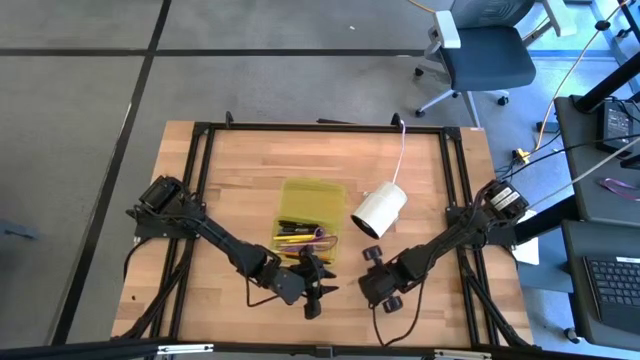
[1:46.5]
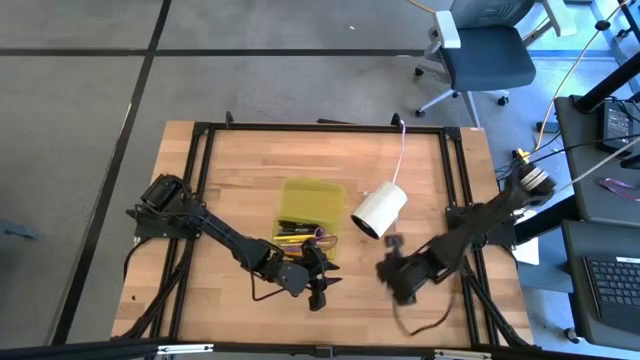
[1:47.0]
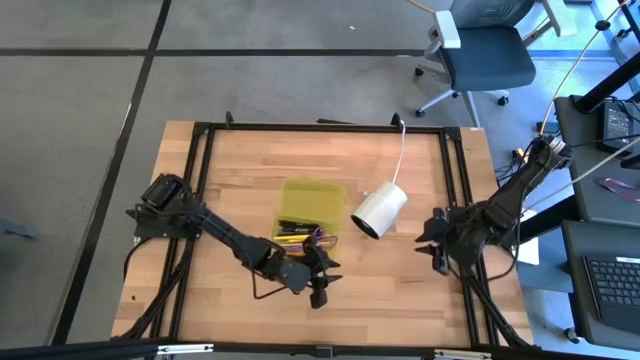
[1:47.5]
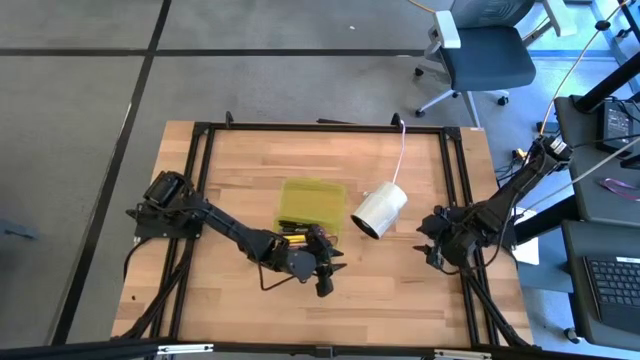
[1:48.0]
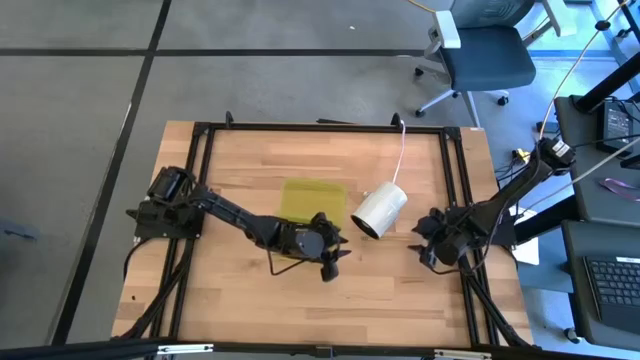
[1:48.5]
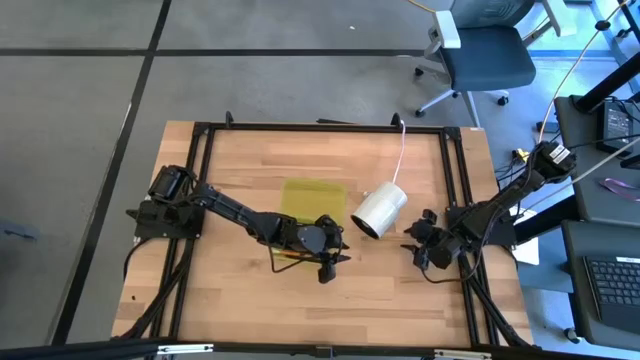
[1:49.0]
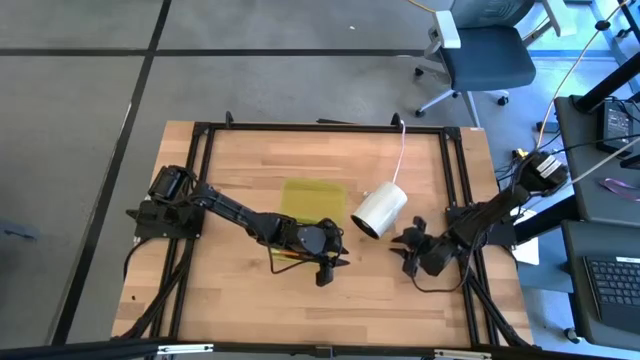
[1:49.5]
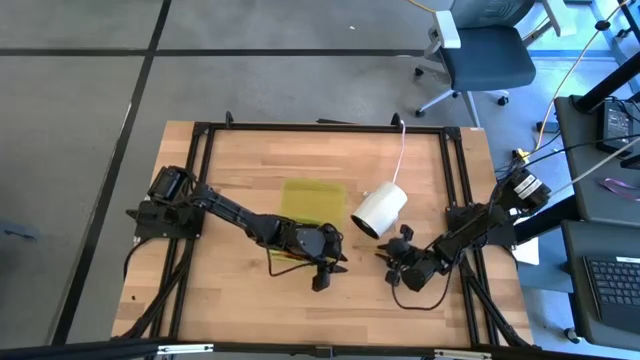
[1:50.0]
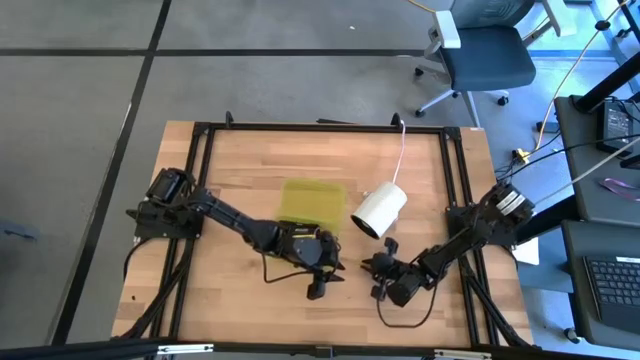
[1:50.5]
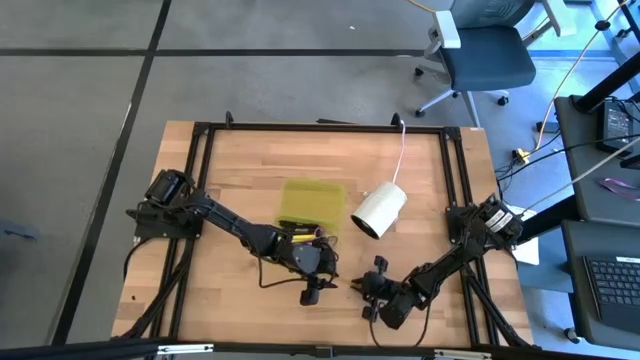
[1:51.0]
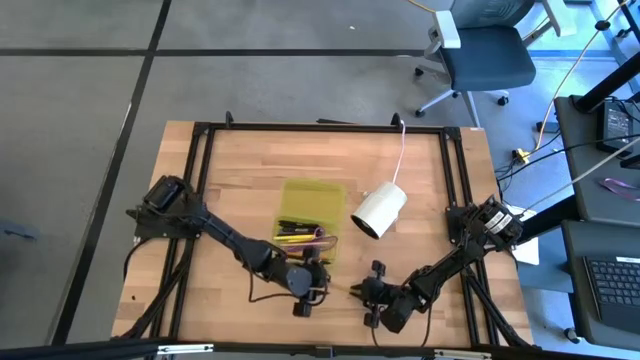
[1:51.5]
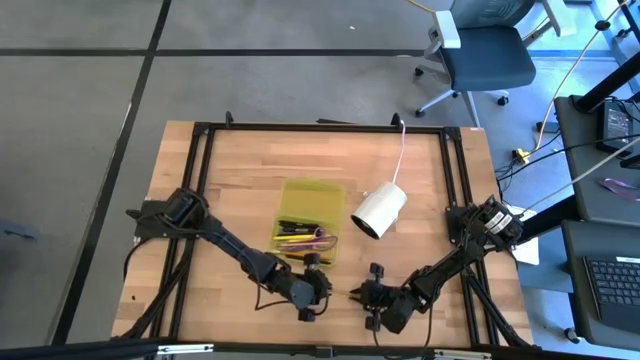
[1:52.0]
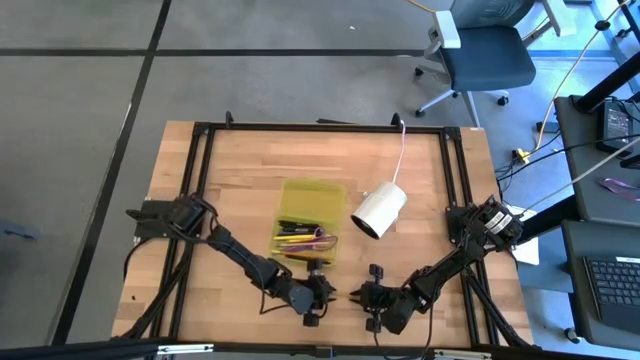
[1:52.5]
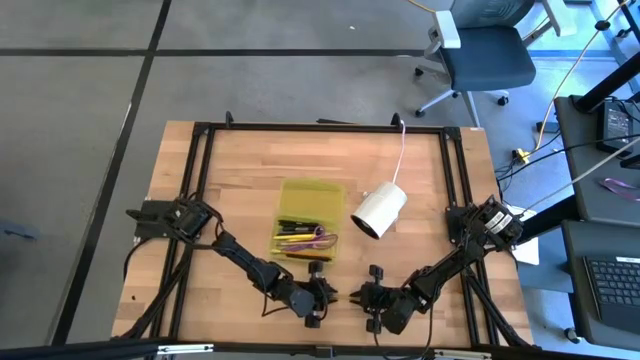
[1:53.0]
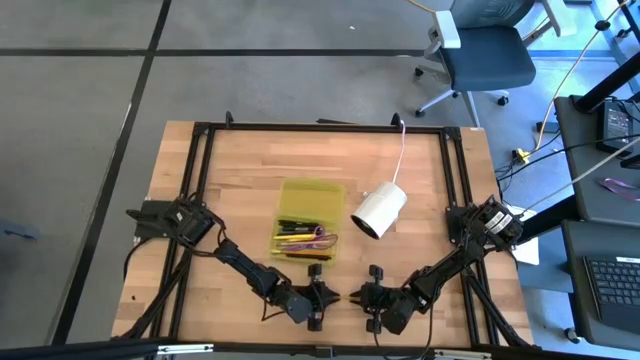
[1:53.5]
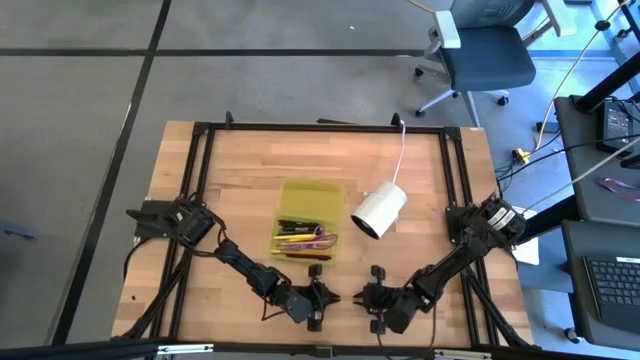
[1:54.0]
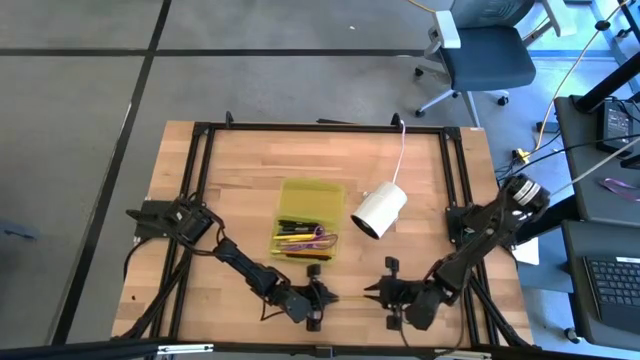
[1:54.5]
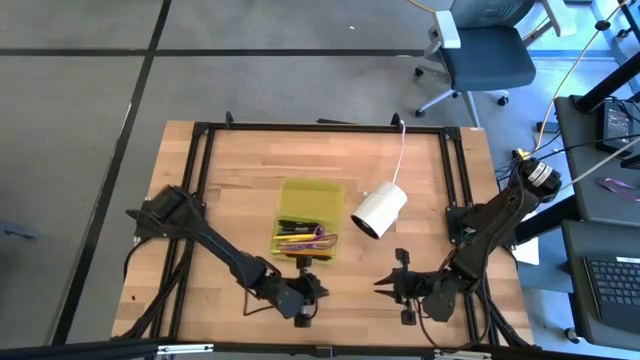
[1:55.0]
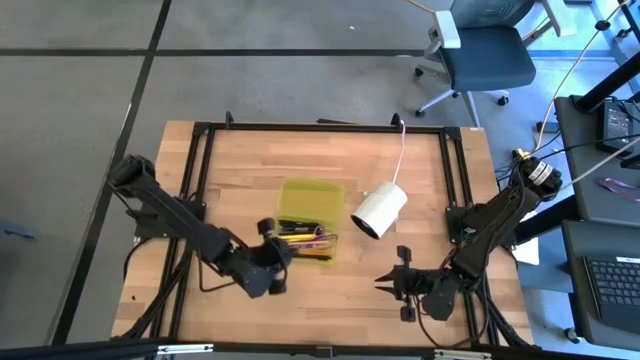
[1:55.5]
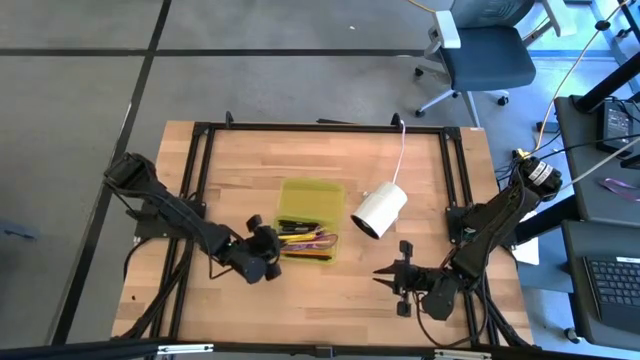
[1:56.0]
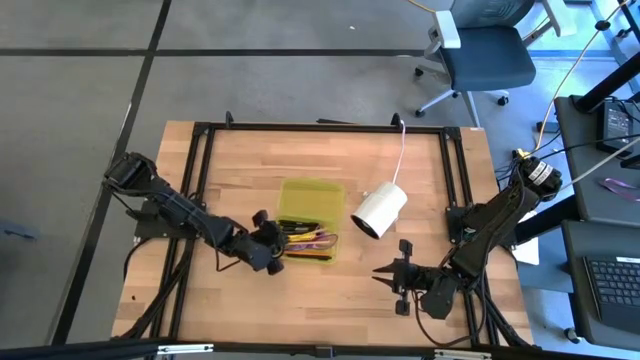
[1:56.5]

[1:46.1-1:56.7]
Task: Pick & place school supplies into a supply box
Put the yellow pencil into the yellow supply box

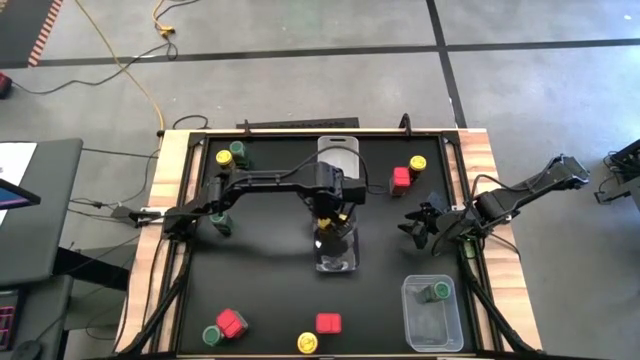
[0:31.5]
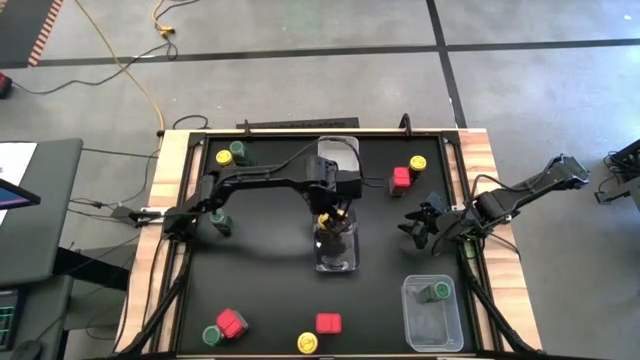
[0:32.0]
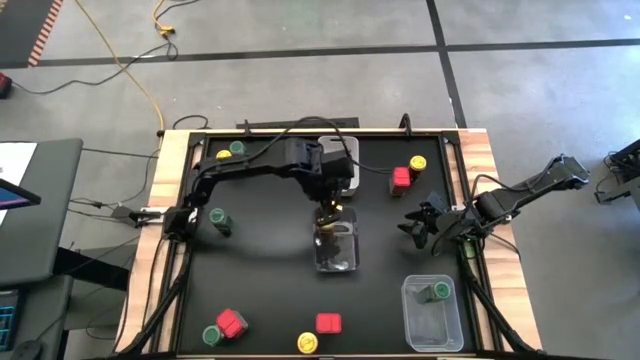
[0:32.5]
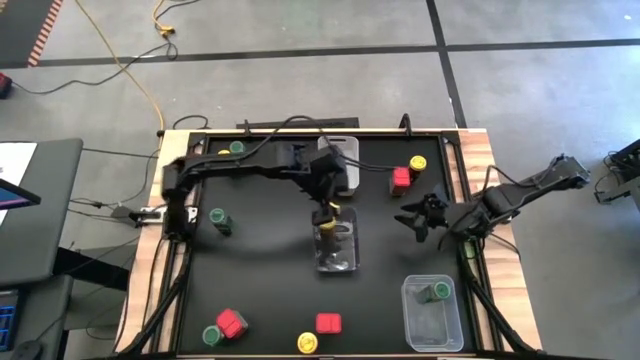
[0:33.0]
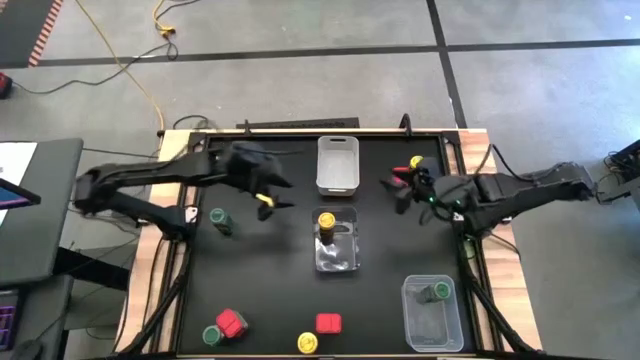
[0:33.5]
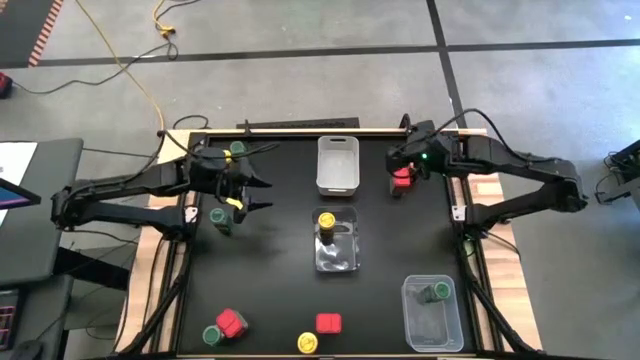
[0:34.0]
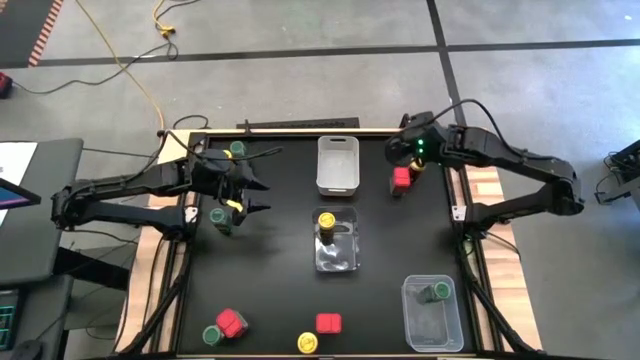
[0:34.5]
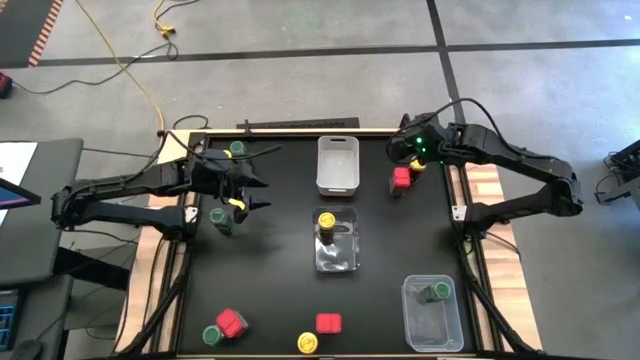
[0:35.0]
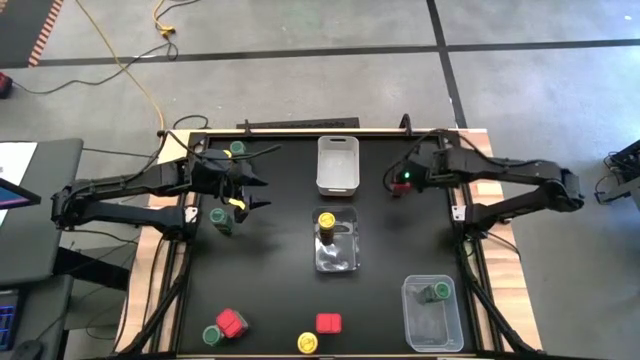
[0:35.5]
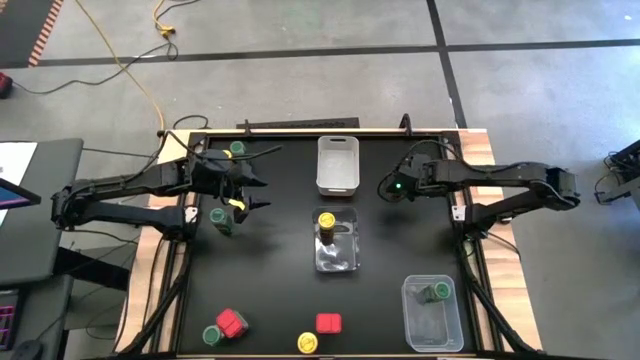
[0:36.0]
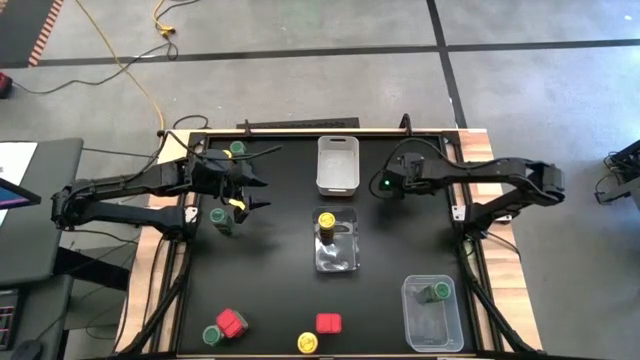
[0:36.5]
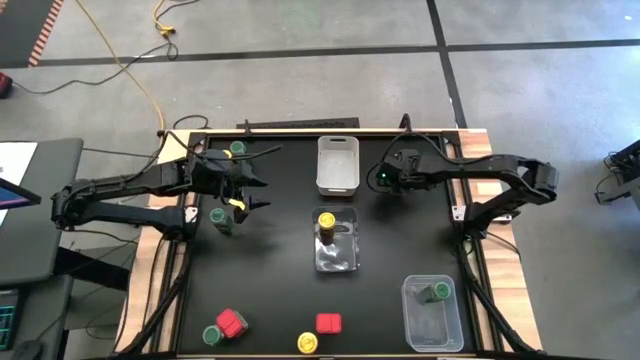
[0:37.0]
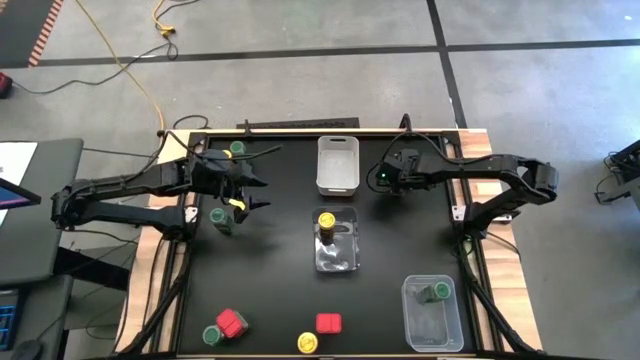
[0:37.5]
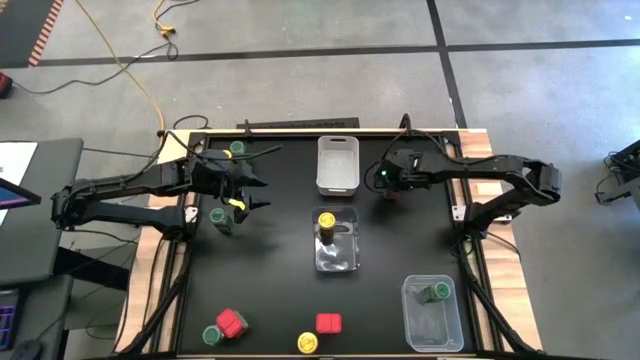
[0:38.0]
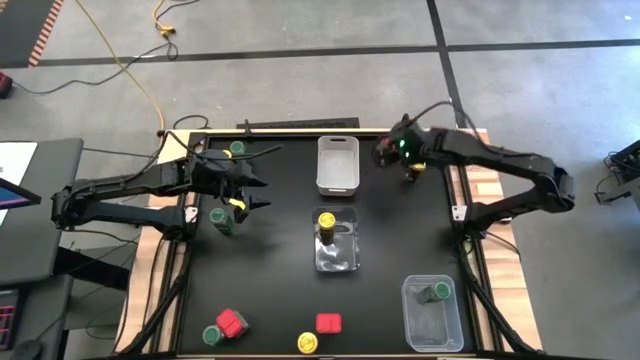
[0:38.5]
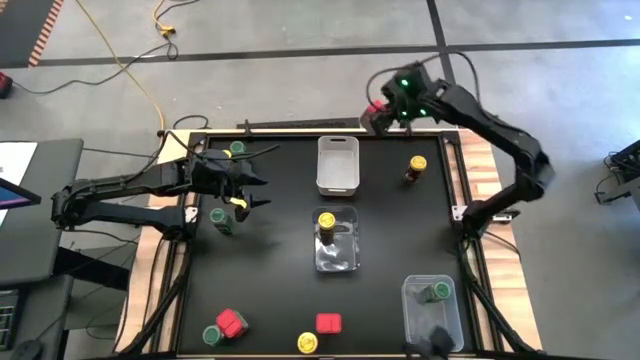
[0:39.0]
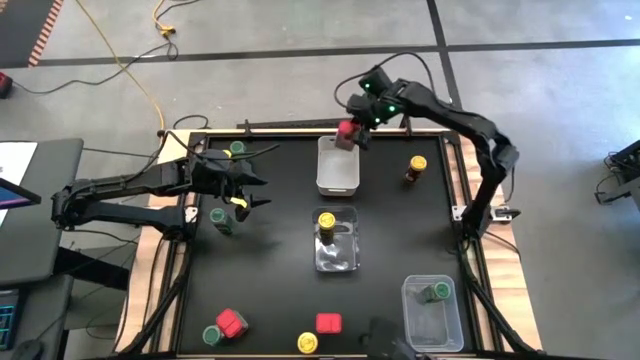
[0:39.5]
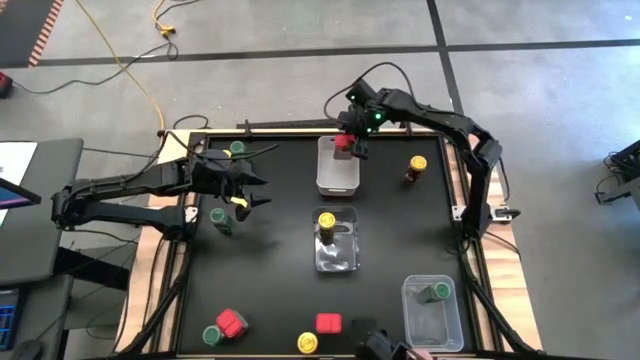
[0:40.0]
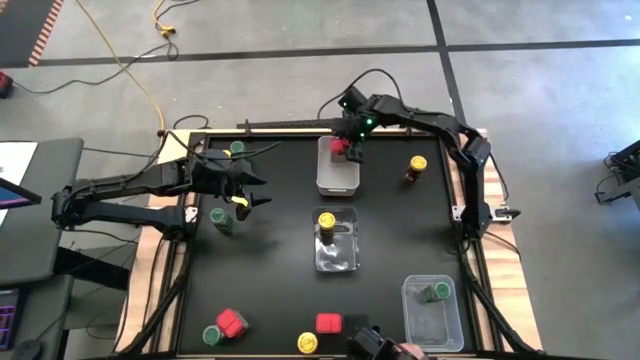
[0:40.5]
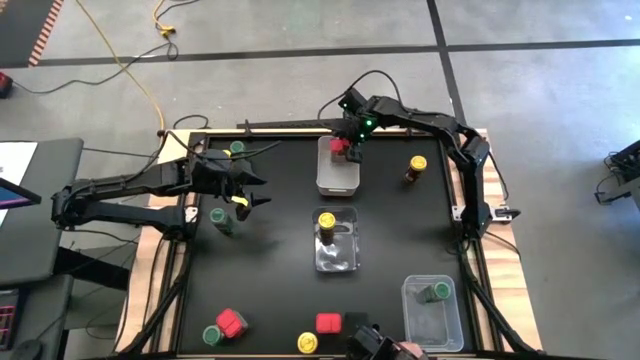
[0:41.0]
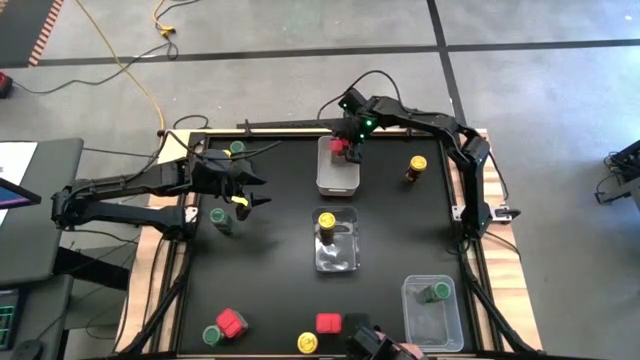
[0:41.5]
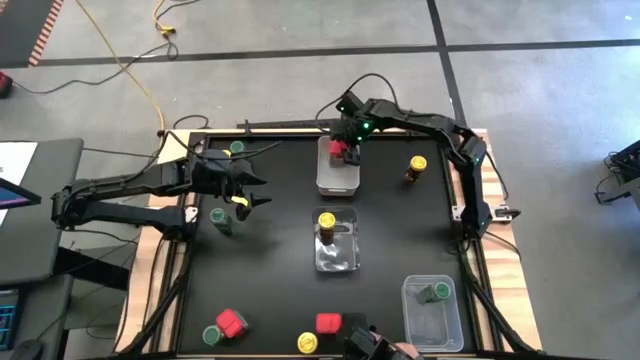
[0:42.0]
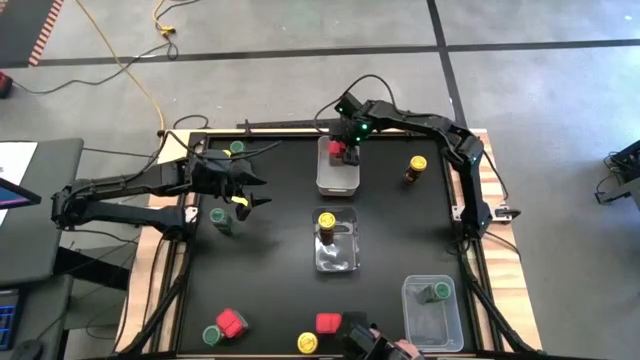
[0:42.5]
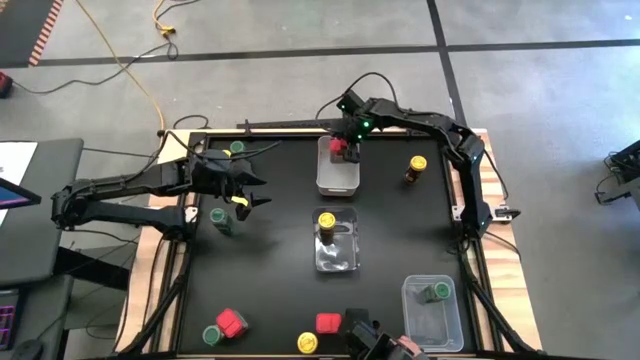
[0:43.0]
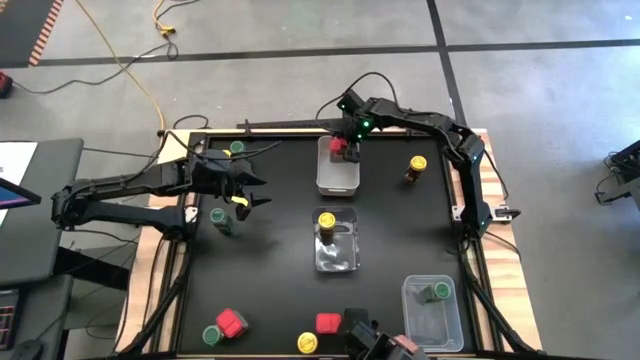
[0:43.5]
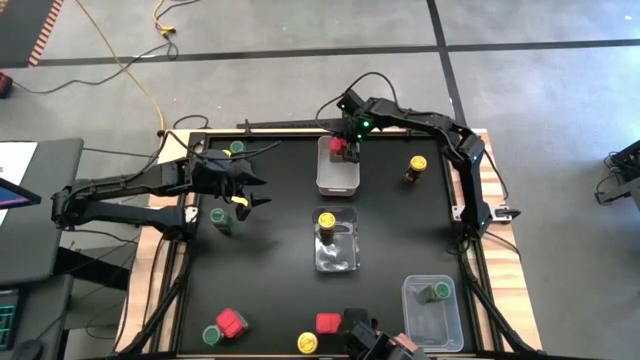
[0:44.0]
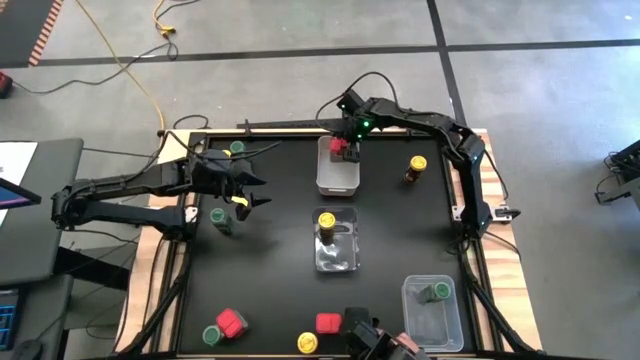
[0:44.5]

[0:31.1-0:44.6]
Task: Sort spices by type
Put the top right red seasoning can into the white bin
